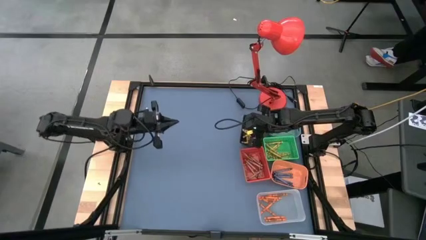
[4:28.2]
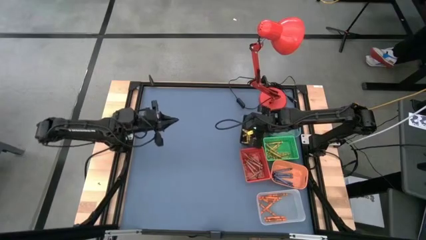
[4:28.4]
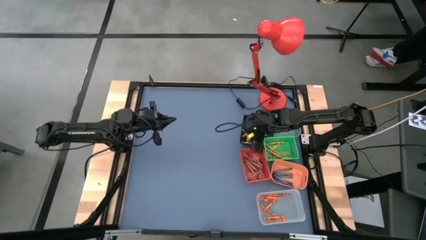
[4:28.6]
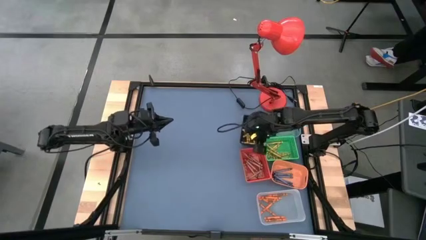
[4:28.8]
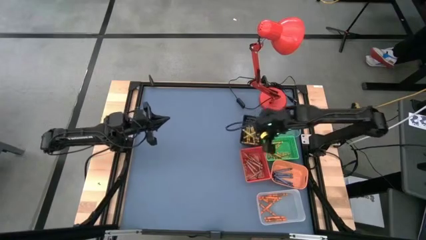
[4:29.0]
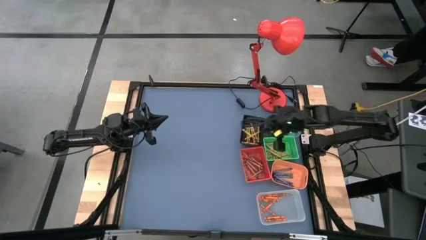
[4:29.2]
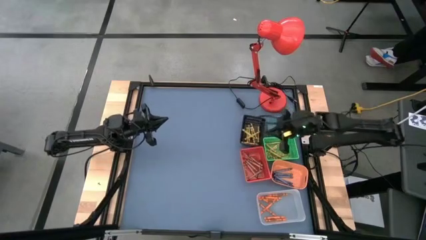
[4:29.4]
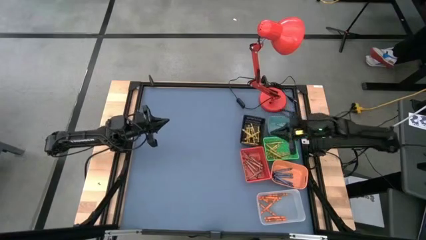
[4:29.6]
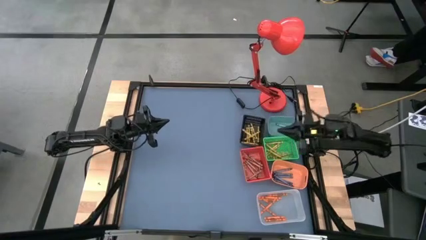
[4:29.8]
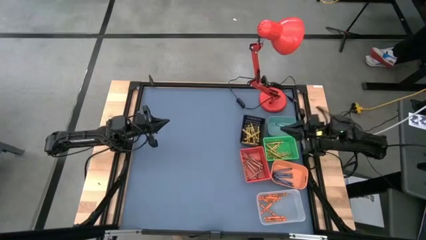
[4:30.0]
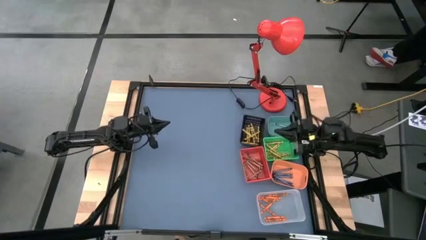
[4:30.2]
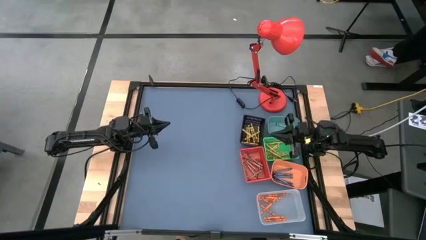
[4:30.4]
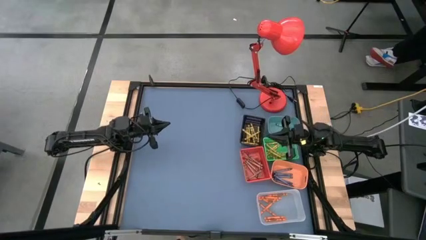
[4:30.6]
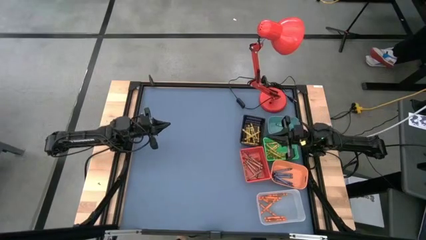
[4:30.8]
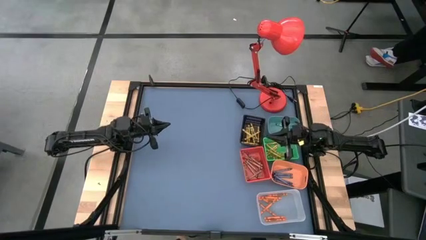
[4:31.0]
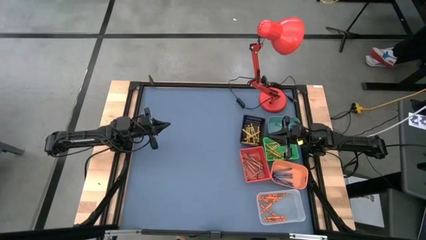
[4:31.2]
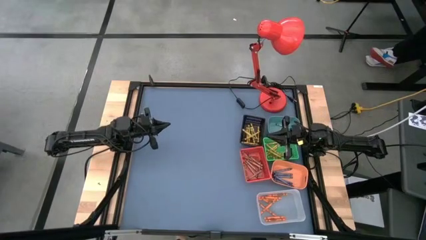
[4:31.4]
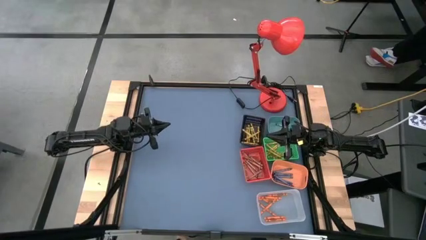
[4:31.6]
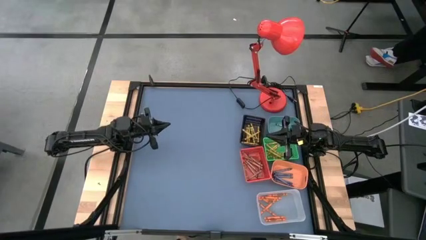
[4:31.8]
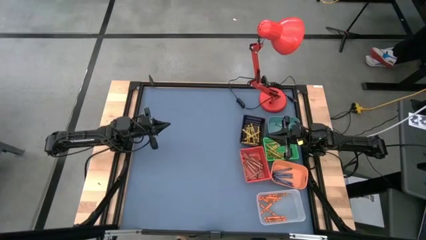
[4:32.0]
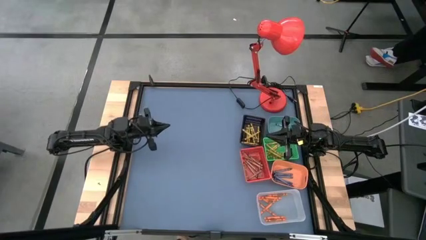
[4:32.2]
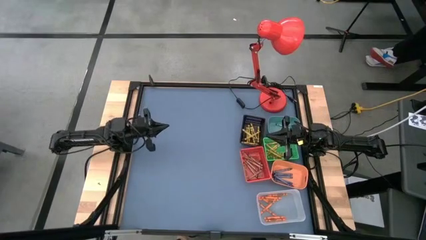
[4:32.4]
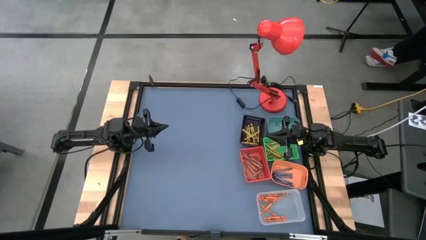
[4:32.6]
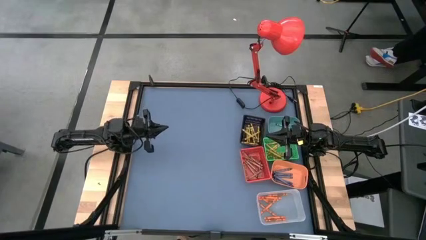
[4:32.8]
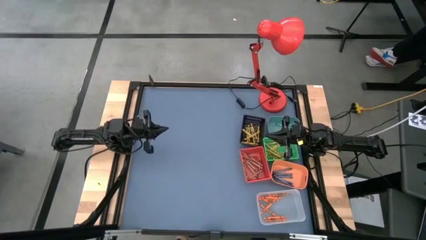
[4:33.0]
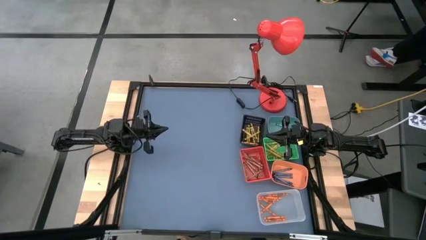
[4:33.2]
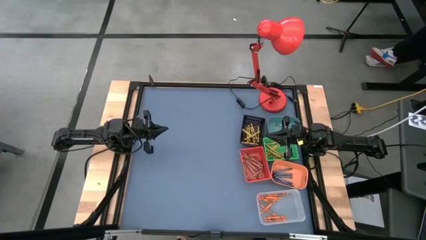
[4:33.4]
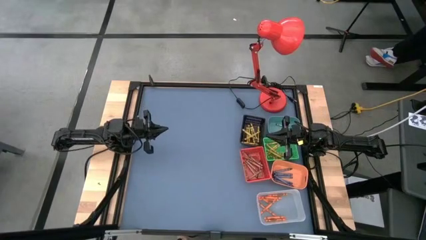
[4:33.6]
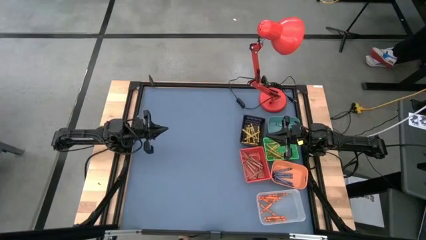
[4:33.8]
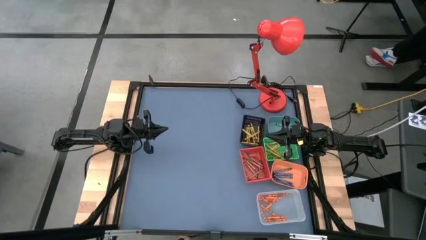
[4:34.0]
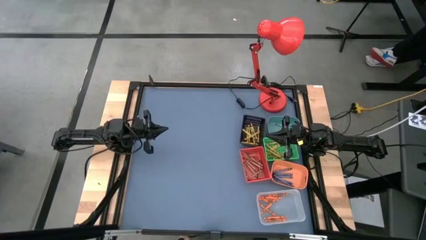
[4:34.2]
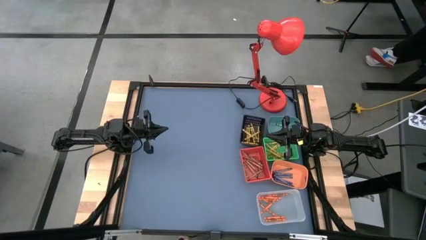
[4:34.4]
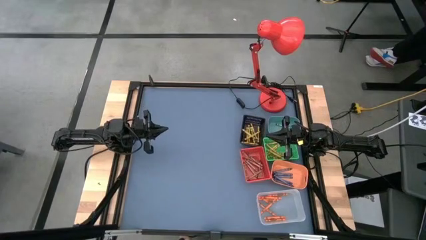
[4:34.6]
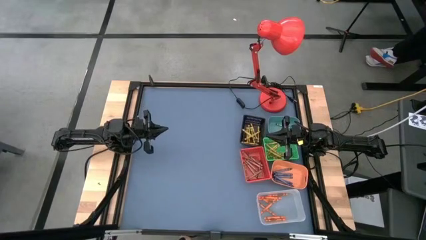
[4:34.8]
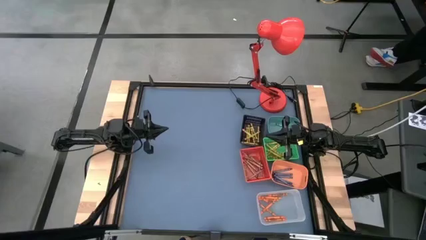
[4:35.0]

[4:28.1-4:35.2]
Task: Sort crayons
Return to Home Position

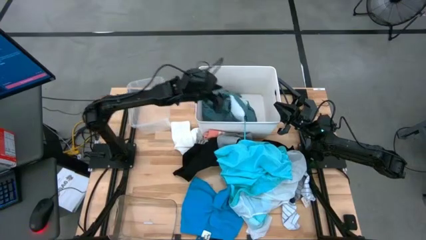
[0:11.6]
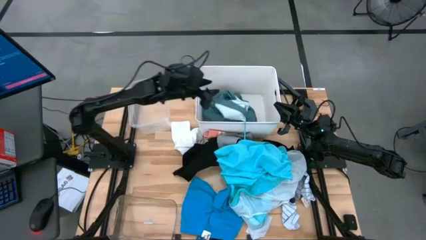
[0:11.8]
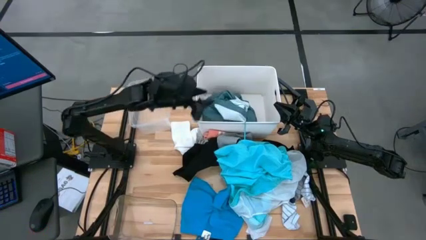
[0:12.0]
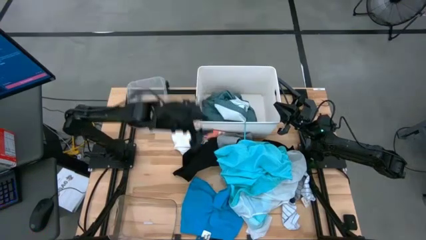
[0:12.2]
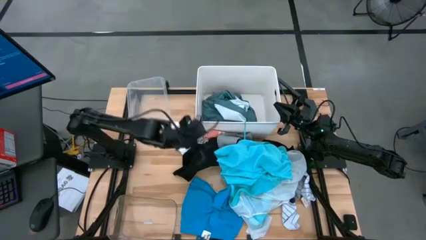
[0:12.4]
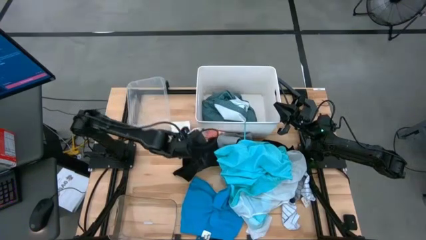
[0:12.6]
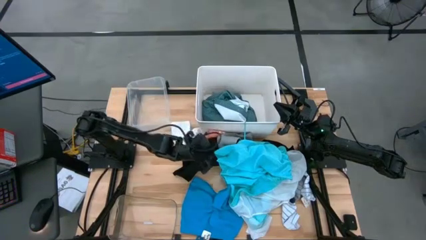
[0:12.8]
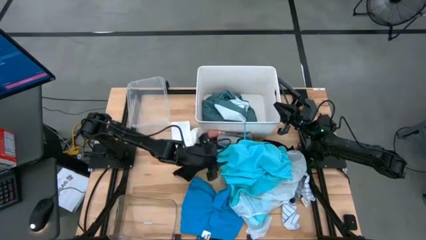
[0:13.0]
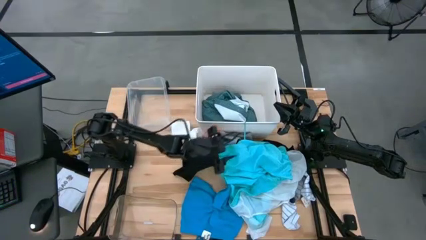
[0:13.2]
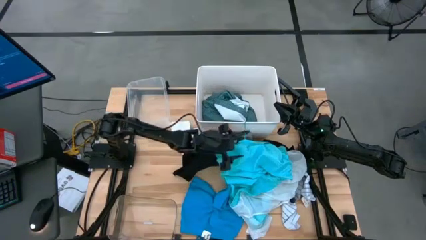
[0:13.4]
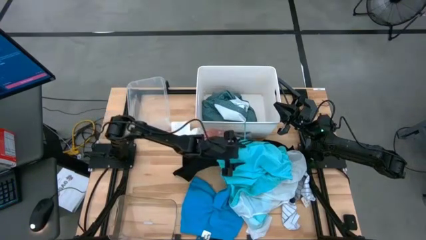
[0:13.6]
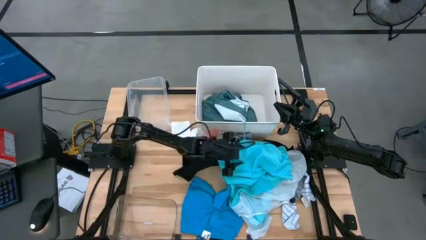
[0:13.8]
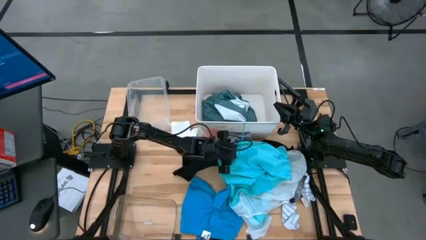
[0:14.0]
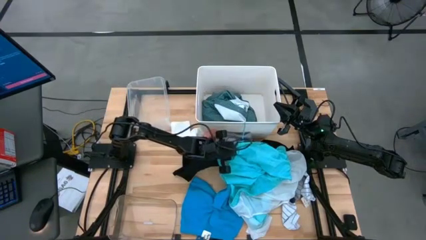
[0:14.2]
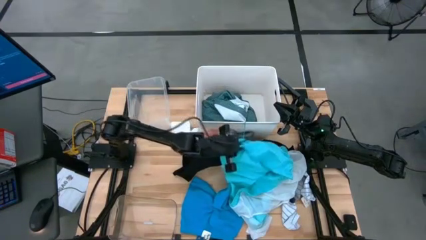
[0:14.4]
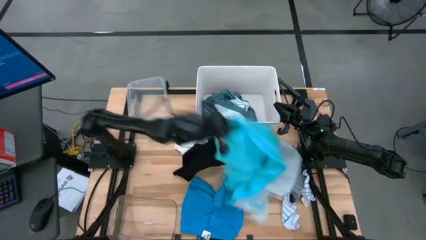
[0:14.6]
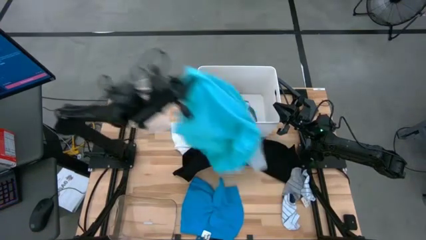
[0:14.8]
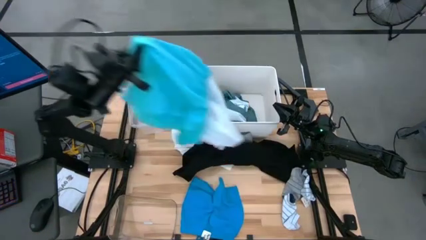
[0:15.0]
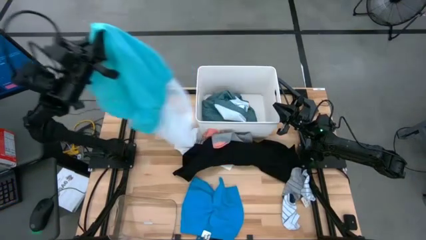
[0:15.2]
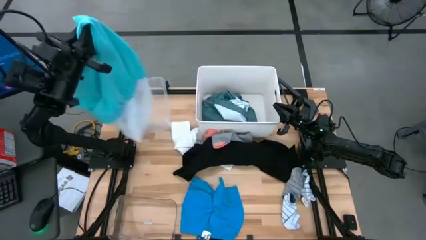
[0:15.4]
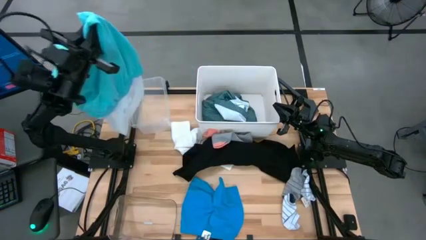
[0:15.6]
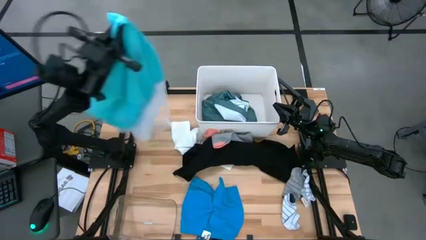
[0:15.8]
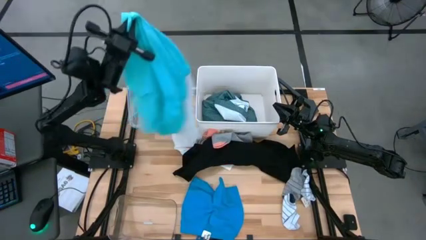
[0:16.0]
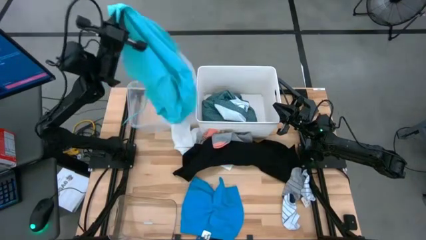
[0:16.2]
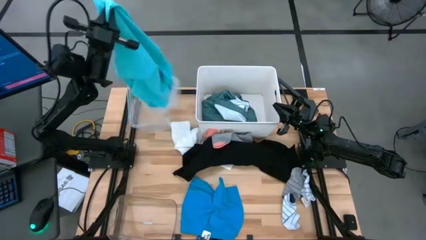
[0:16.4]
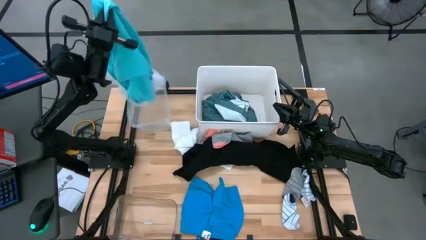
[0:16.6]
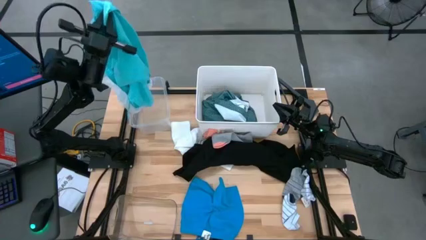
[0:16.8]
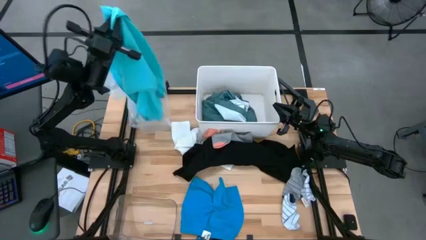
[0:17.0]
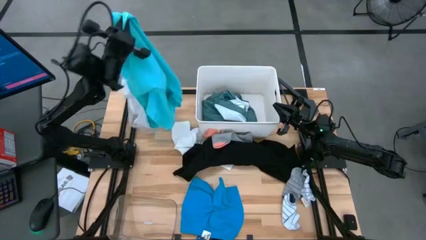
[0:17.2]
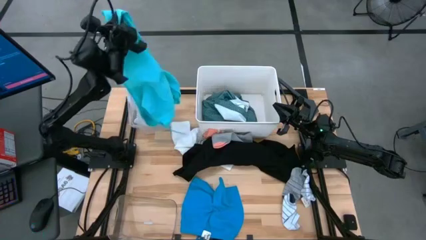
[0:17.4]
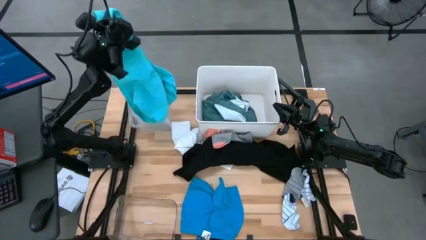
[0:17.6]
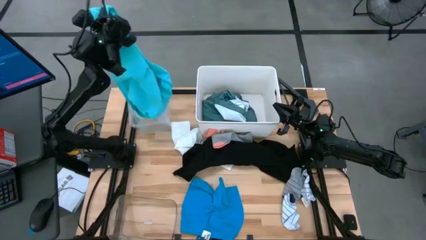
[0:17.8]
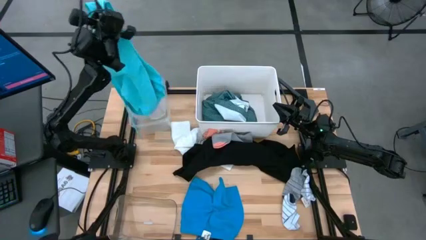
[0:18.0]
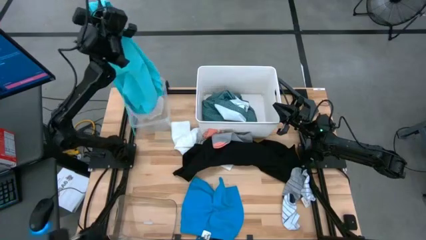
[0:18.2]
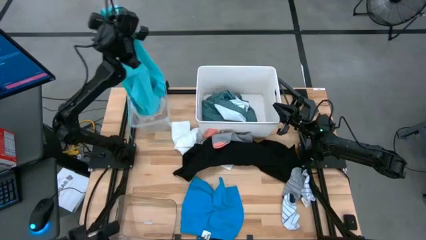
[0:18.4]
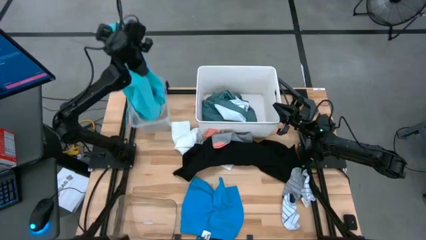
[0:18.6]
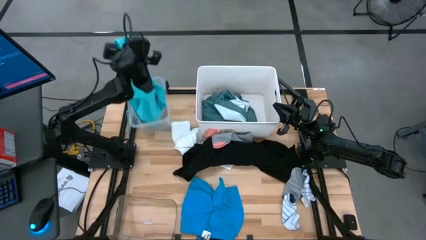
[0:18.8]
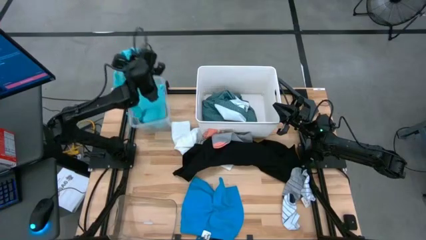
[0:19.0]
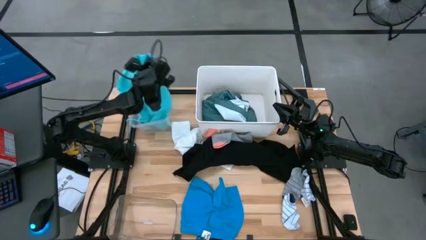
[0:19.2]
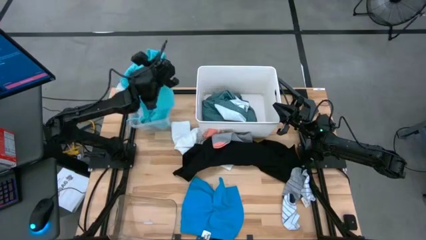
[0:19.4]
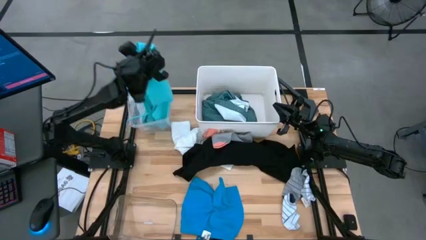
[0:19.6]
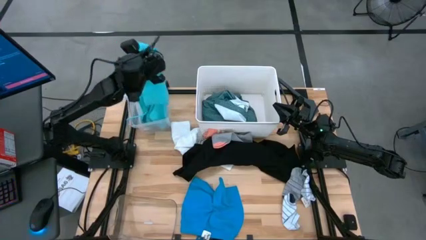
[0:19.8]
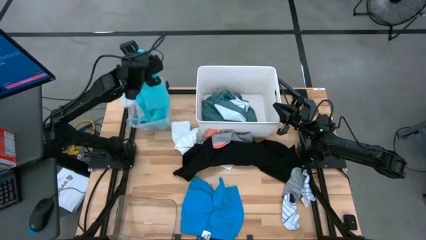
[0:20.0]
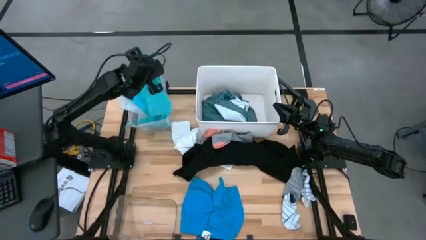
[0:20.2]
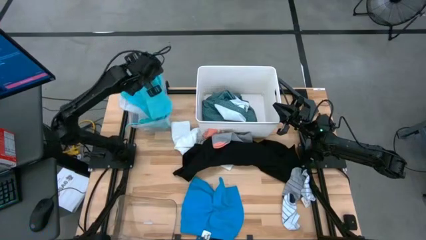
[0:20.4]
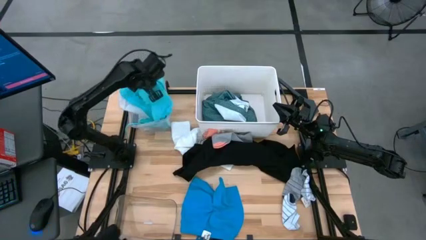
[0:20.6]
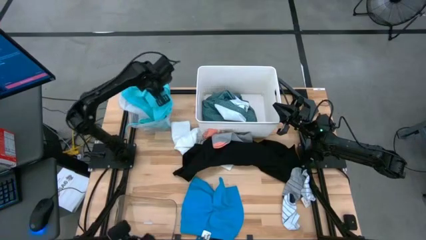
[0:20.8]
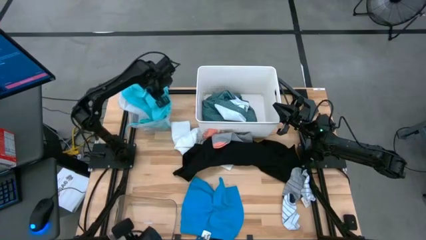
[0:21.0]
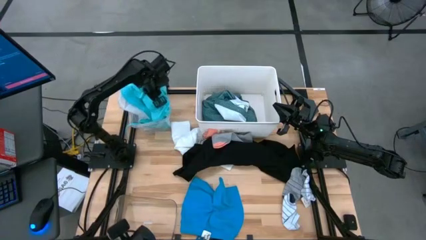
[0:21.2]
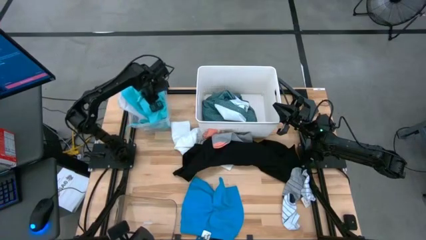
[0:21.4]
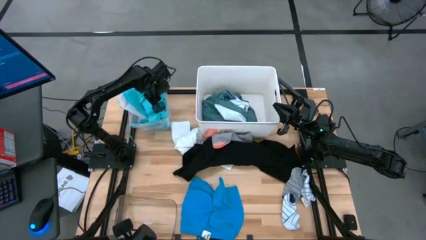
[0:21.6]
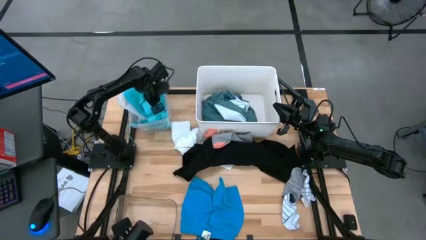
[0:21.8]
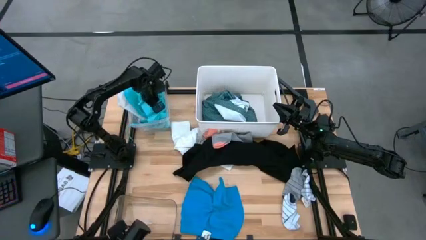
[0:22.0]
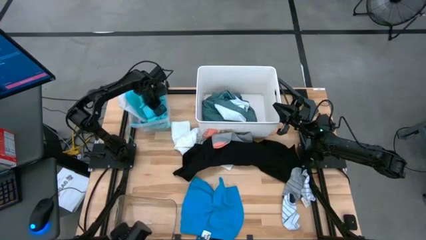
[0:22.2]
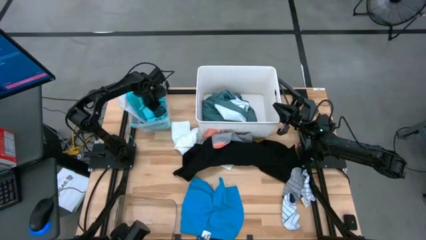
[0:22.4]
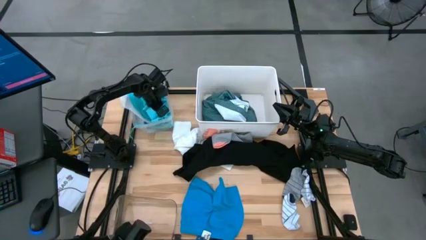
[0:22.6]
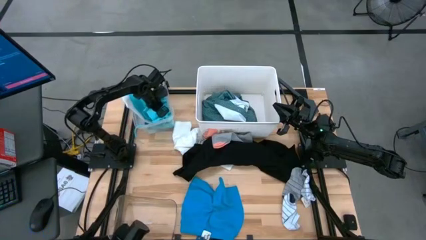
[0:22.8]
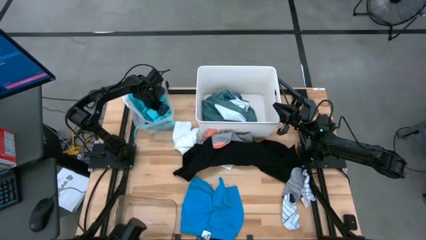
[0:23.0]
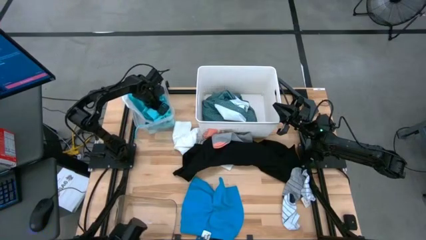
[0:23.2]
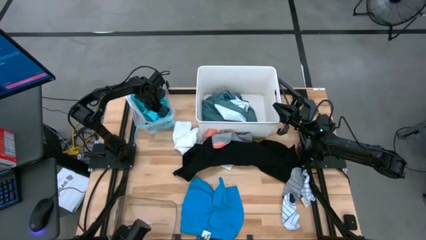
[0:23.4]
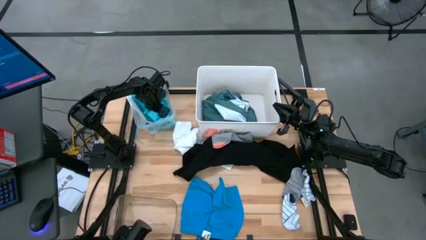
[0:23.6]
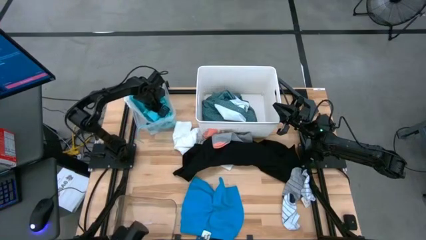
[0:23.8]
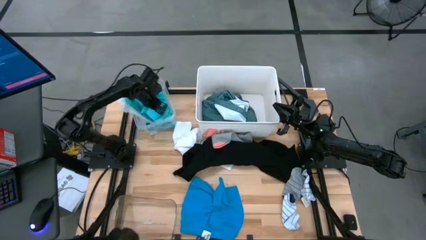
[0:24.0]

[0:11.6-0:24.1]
Task: Pick & Place Cloths
Put the blue shorts into the transparent container
